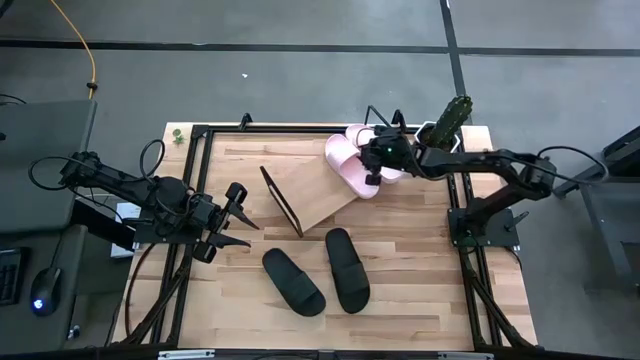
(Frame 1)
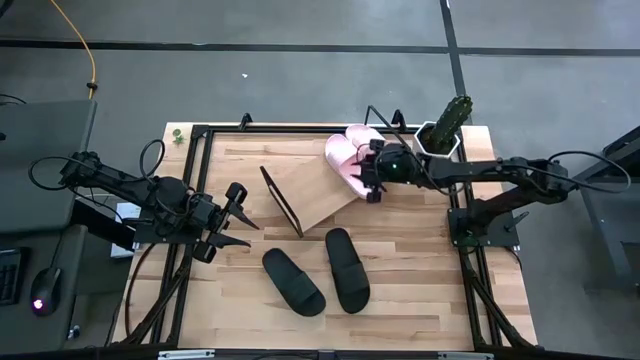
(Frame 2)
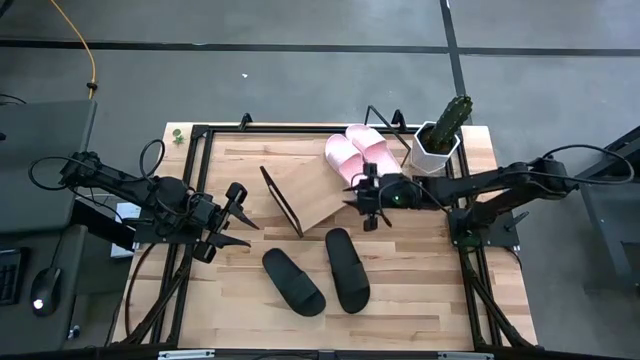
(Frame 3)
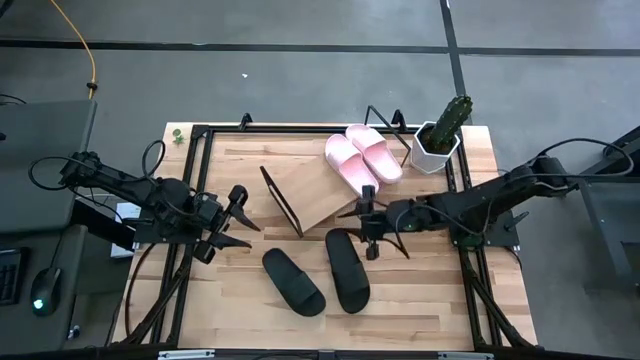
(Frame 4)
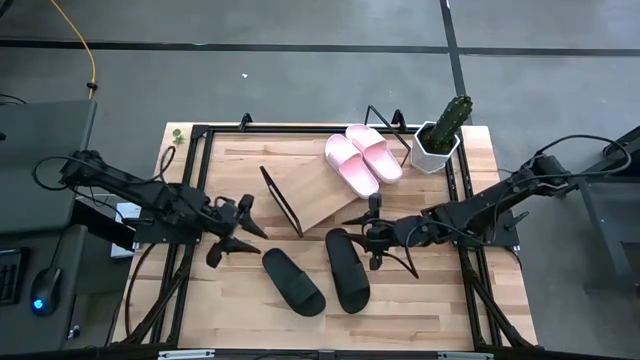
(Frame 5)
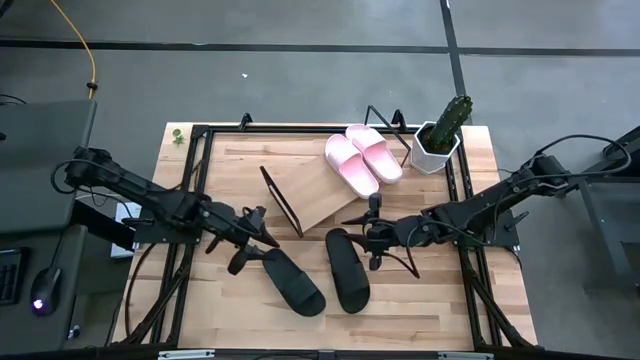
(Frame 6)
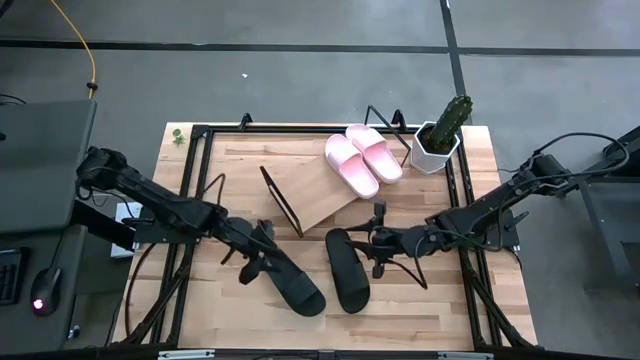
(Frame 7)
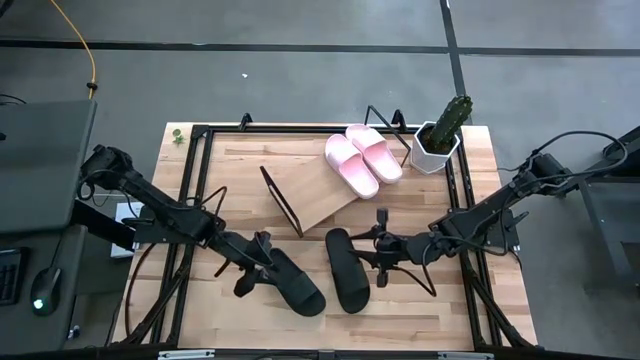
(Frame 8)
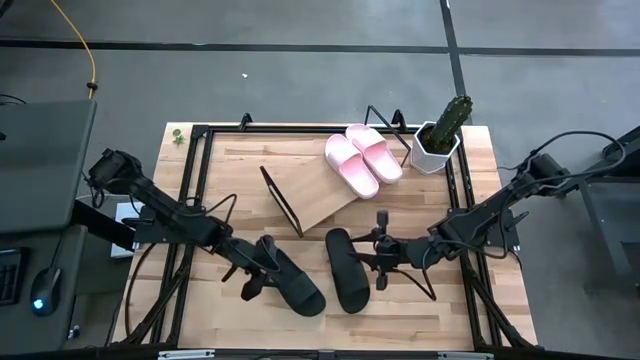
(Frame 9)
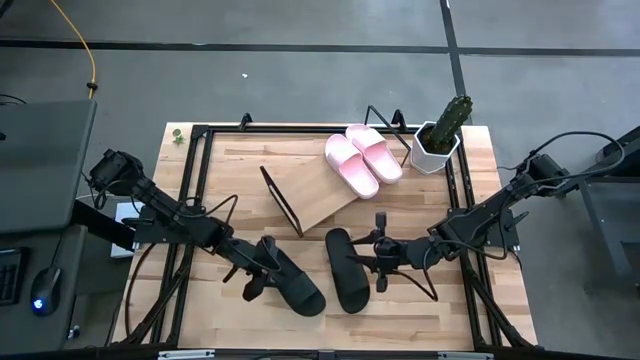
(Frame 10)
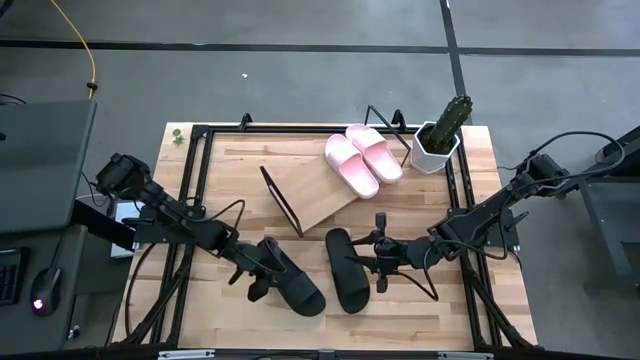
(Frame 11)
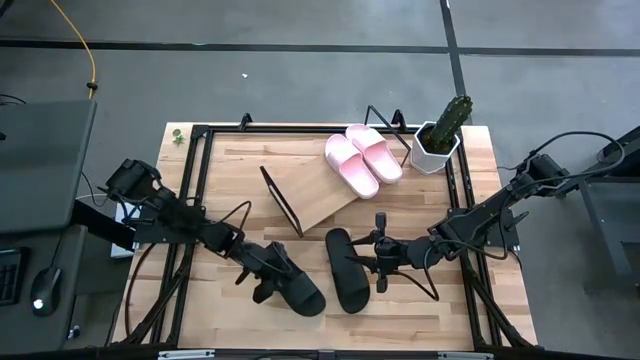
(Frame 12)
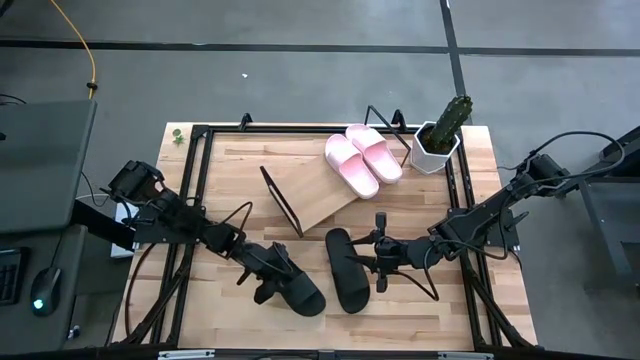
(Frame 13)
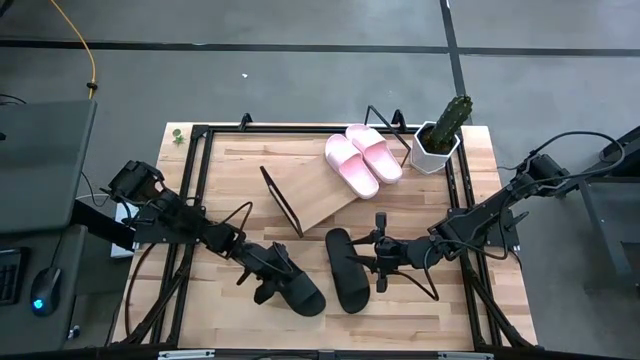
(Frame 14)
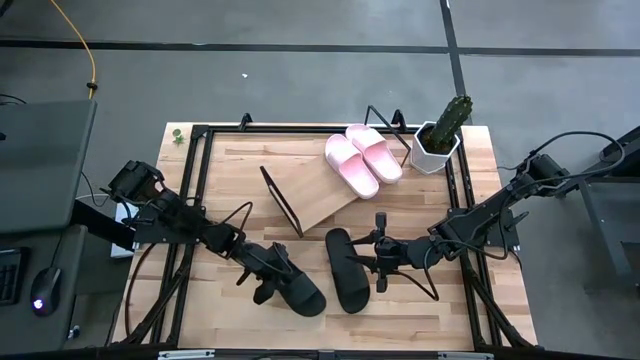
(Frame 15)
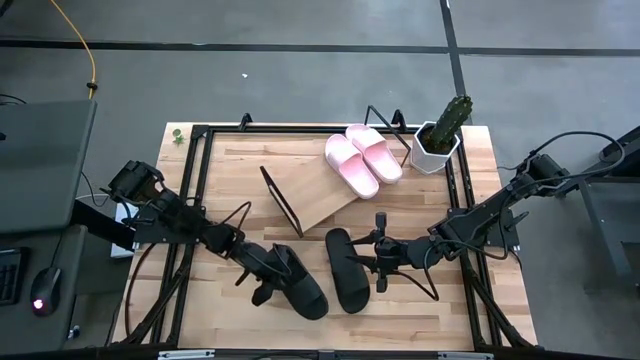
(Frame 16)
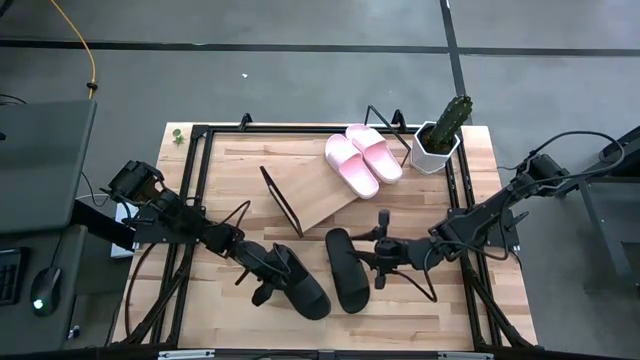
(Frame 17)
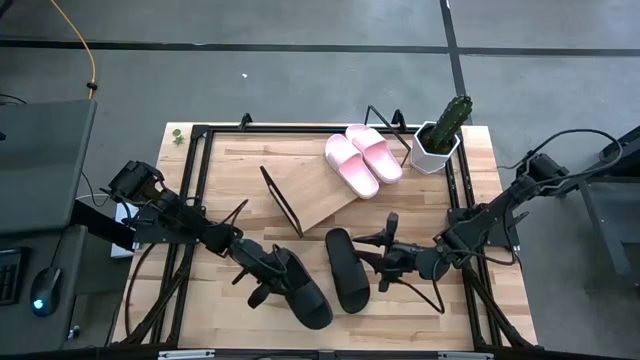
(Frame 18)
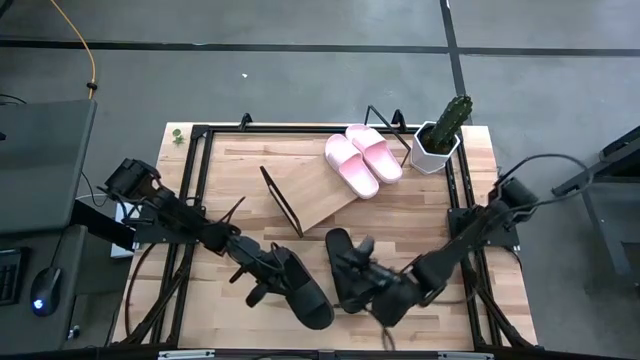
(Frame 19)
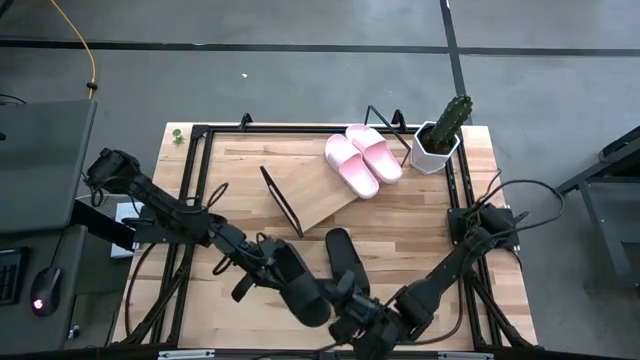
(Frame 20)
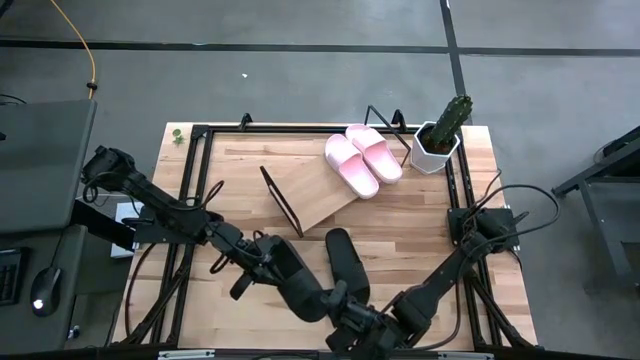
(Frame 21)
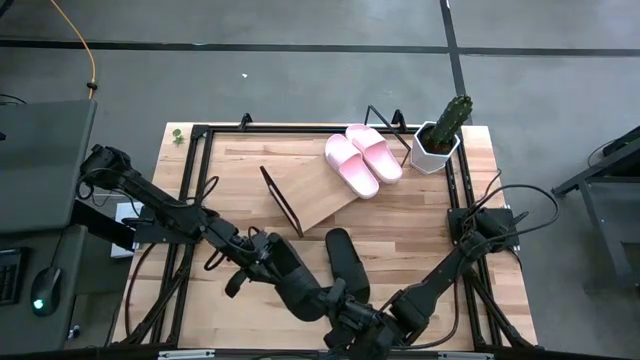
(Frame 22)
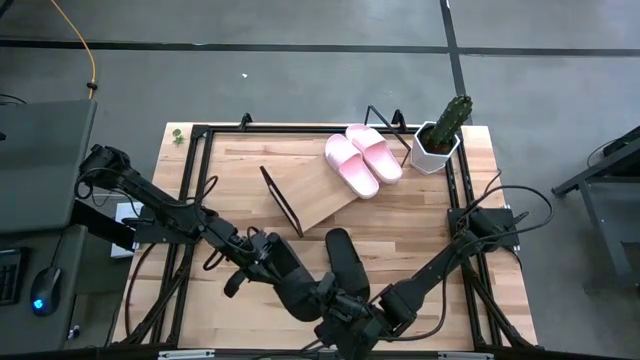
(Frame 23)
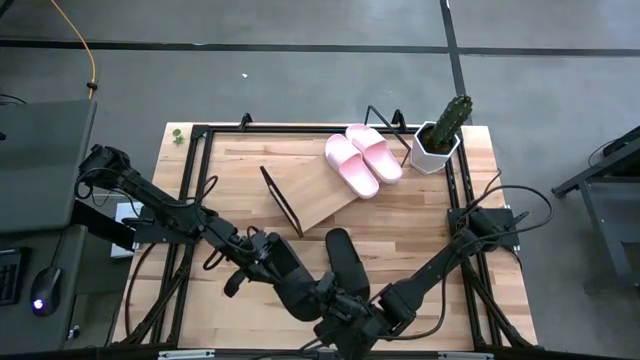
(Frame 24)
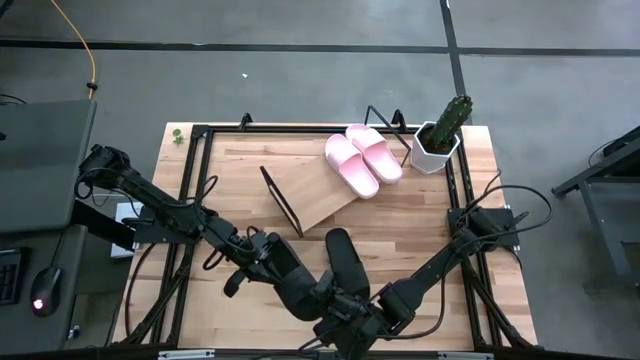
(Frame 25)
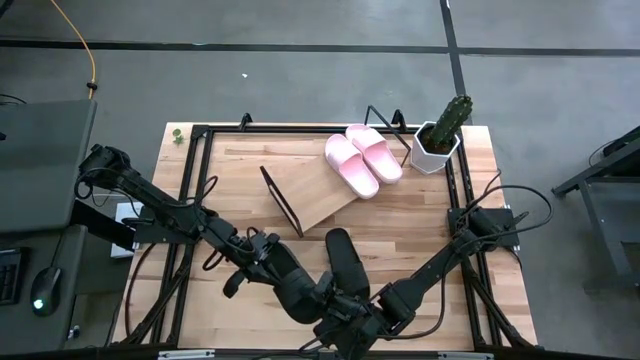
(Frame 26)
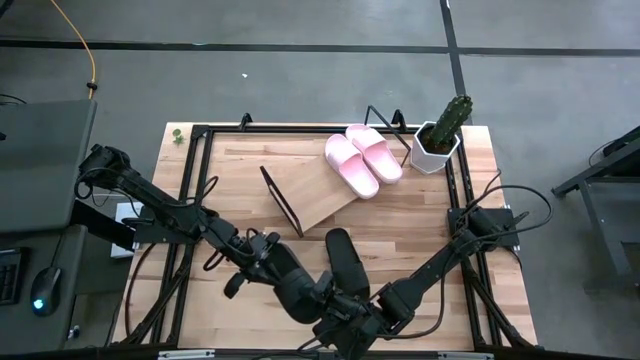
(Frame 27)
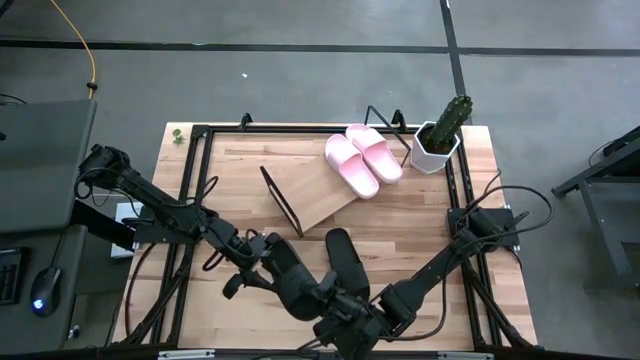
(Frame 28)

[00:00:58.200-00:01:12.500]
Task: Pick and place slides into the shelf
Put the left black slide on the shelf

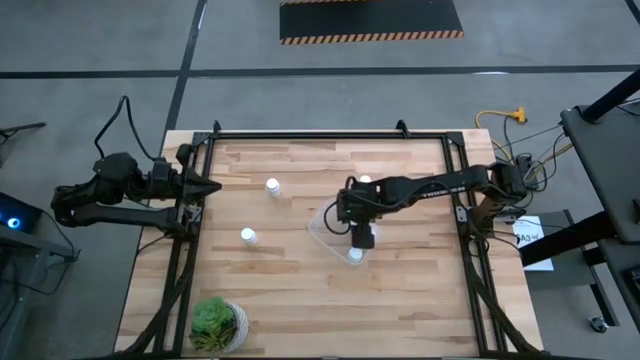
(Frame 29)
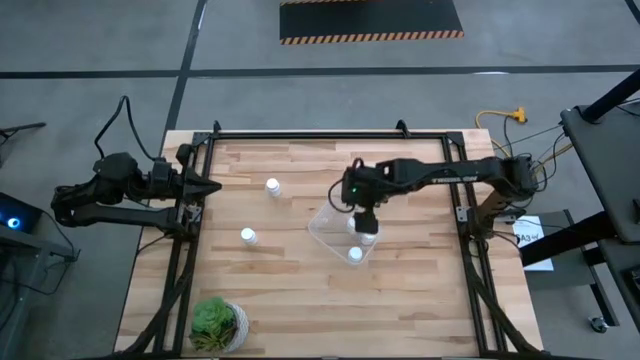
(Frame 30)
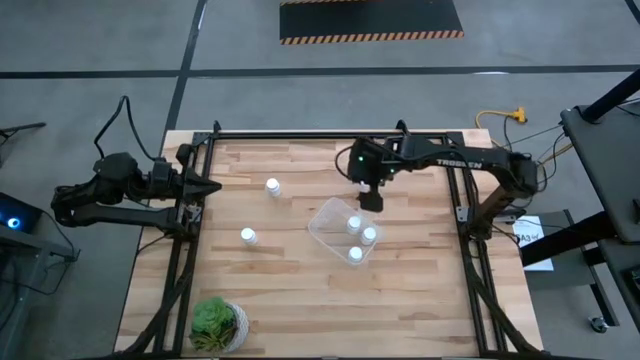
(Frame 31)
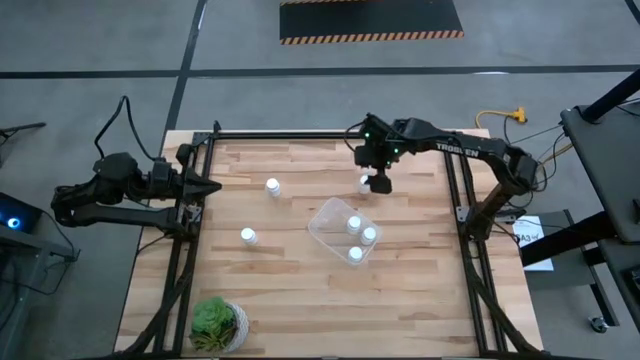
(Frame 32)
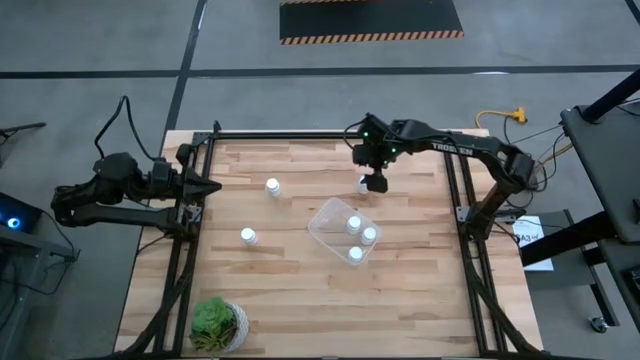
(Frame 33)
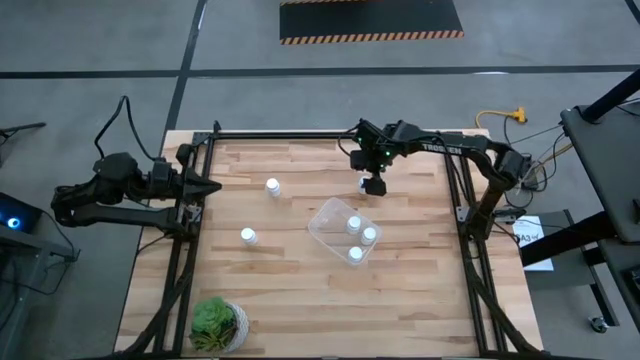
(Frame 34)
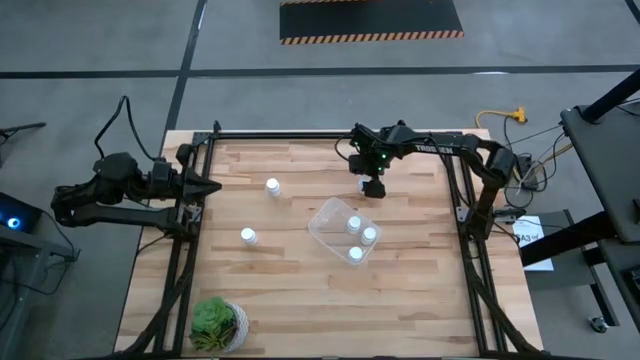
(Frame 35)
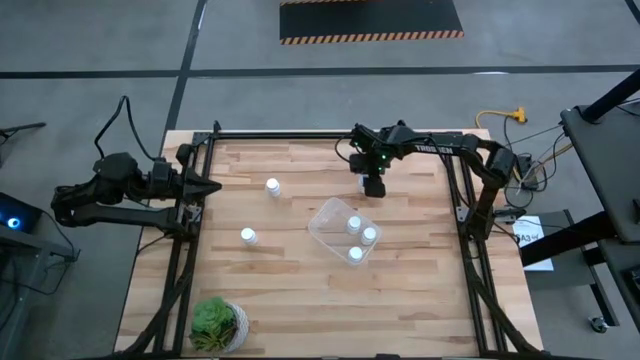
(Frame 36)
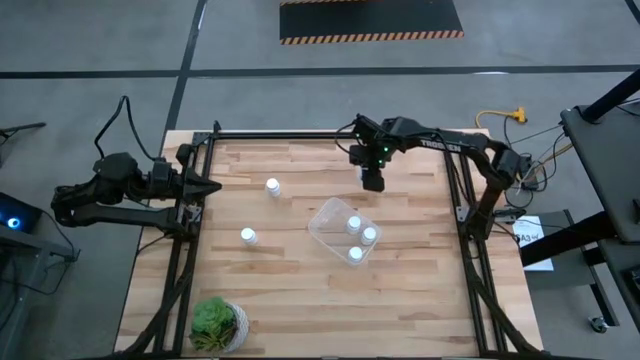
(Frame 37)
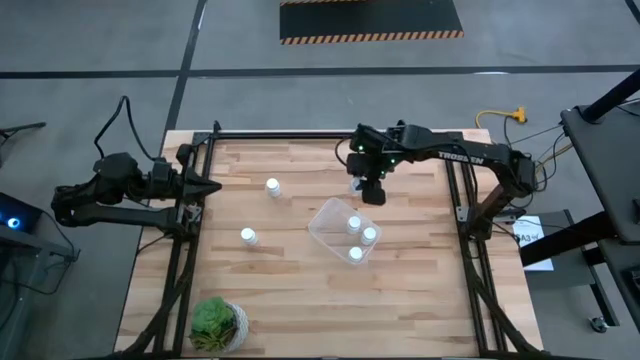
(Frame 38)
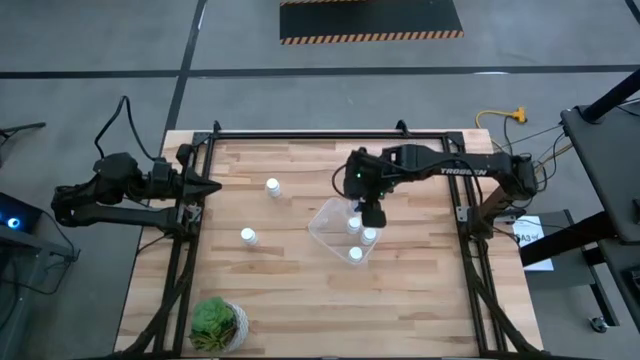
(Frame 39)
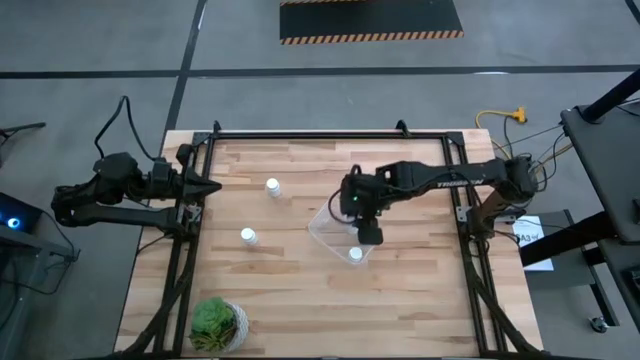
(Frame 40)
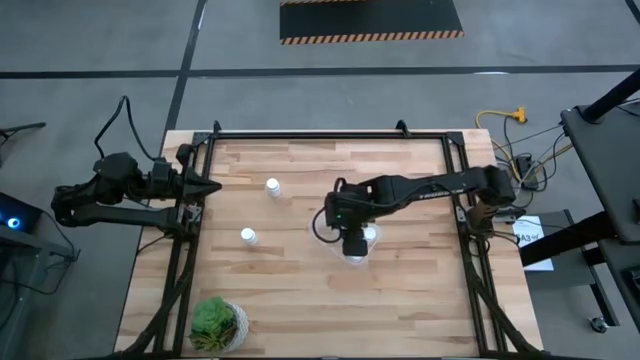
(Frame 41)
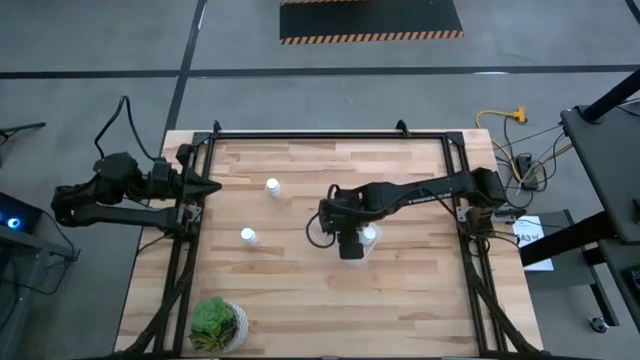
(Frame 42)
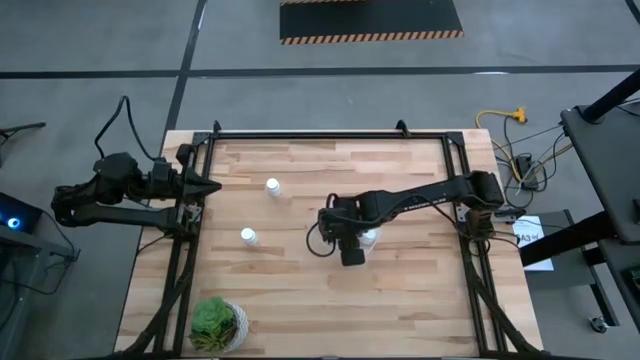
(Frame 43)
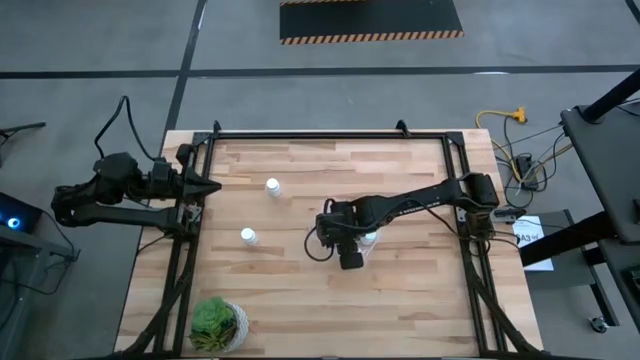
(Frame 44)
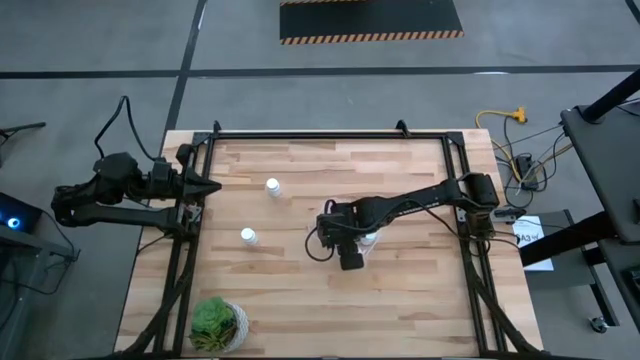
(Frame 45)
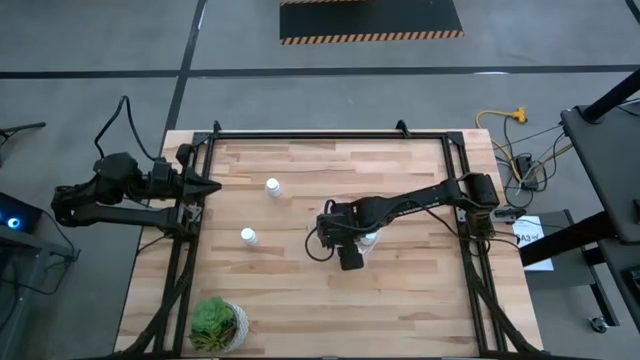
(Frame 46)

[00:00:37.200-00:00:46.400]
Task: Pick and place pill bottles into a basket
Put the white pill bottle into the transparent bin
